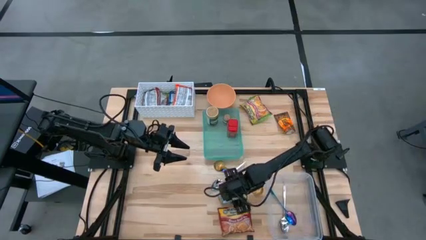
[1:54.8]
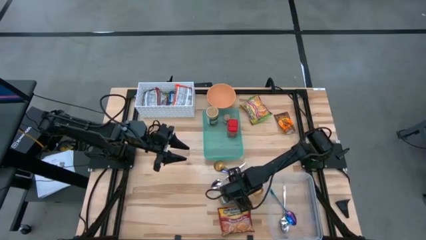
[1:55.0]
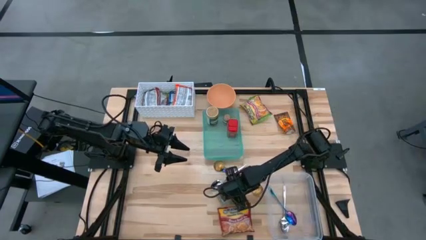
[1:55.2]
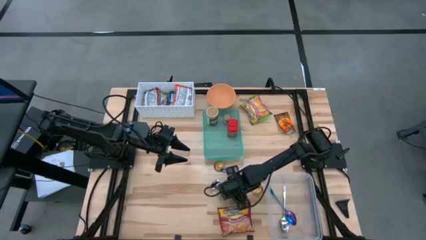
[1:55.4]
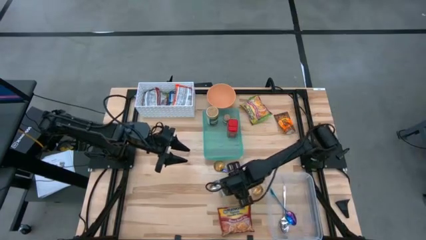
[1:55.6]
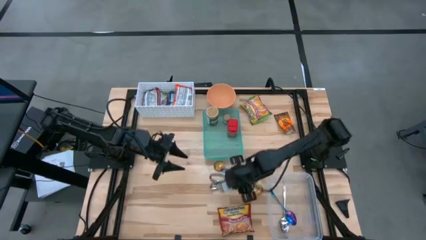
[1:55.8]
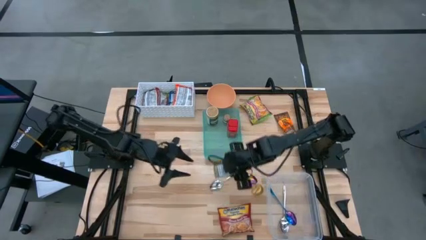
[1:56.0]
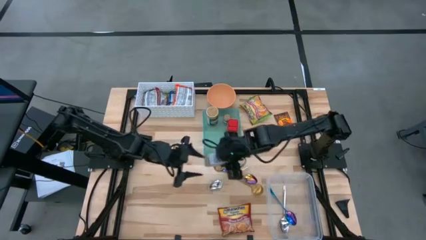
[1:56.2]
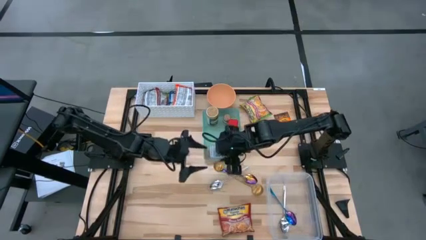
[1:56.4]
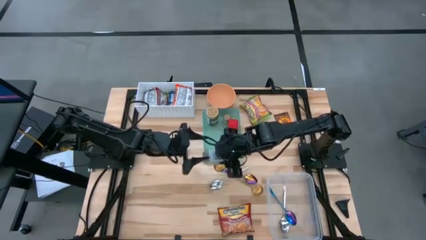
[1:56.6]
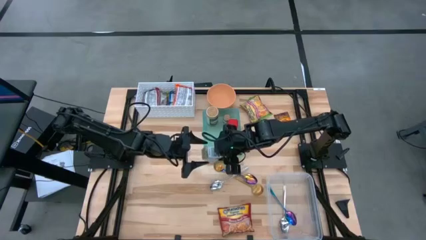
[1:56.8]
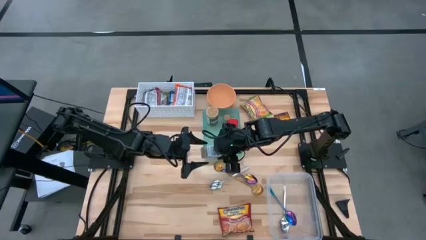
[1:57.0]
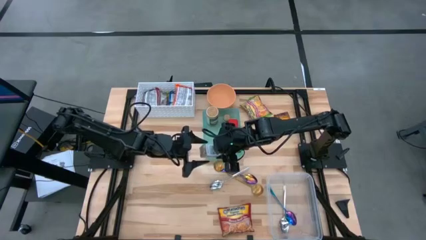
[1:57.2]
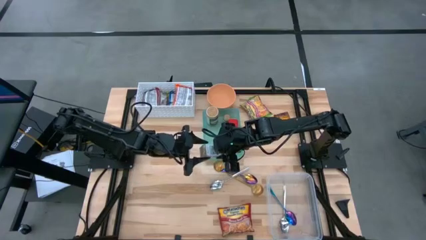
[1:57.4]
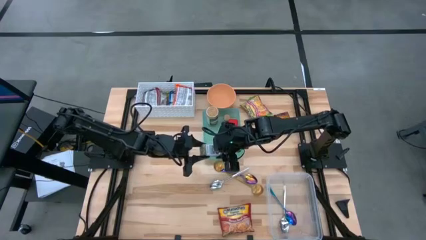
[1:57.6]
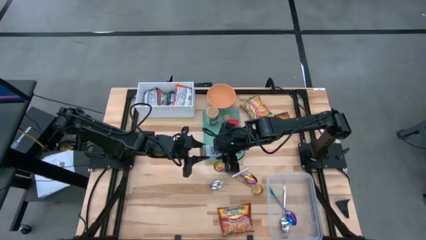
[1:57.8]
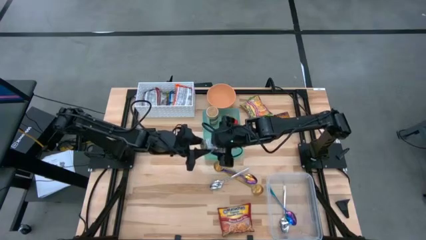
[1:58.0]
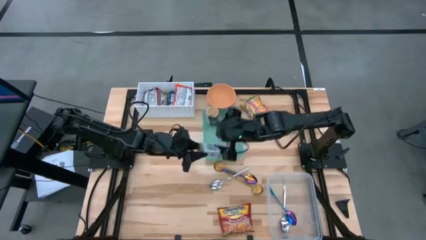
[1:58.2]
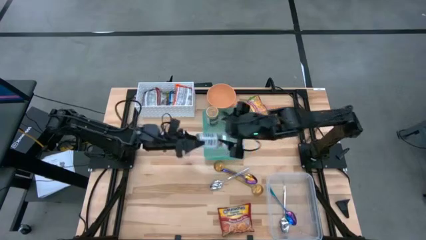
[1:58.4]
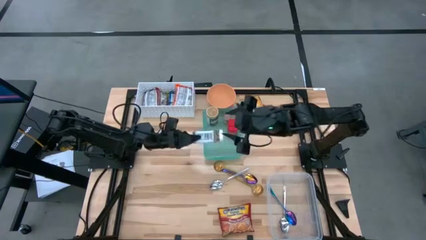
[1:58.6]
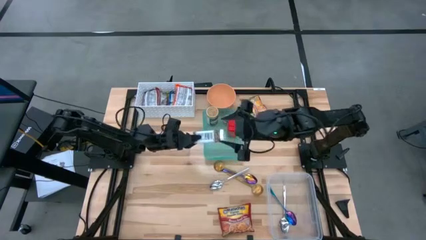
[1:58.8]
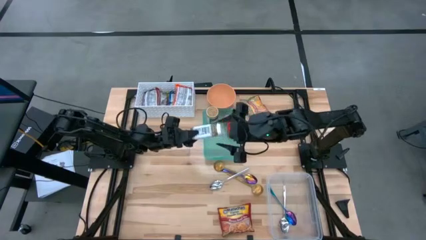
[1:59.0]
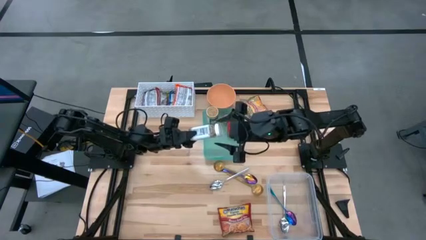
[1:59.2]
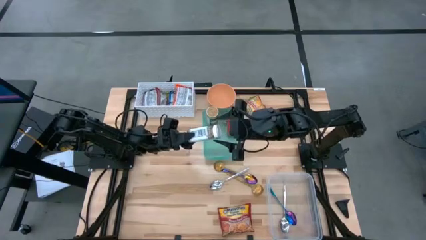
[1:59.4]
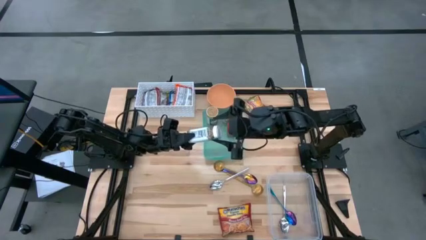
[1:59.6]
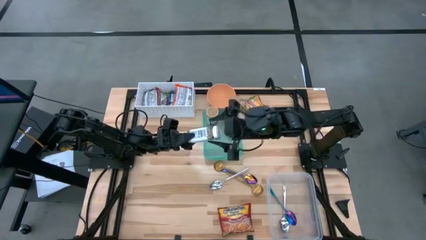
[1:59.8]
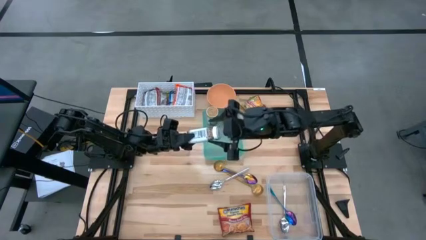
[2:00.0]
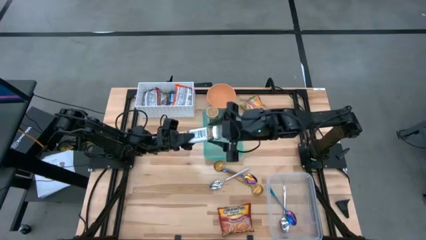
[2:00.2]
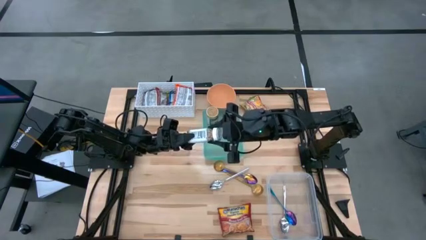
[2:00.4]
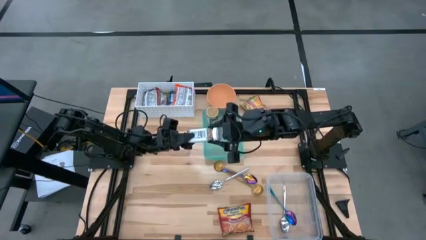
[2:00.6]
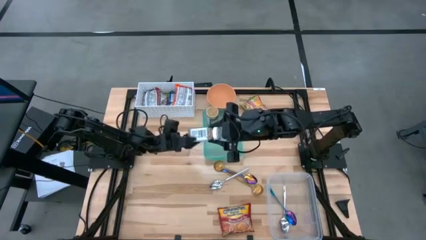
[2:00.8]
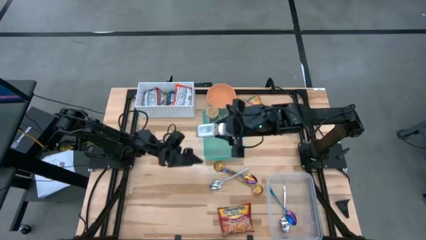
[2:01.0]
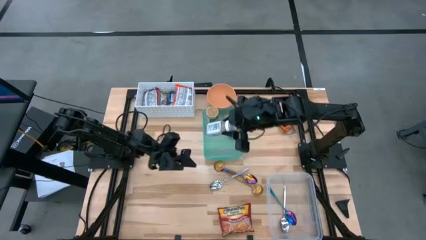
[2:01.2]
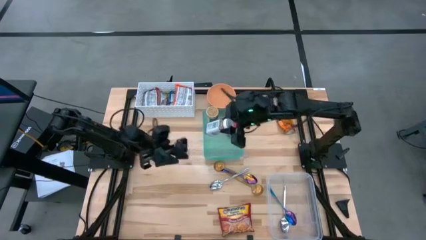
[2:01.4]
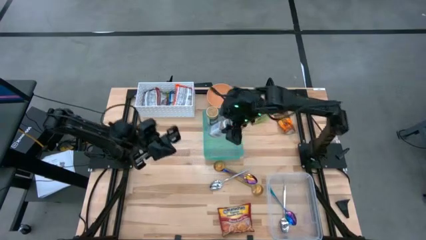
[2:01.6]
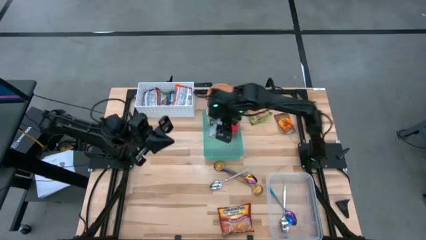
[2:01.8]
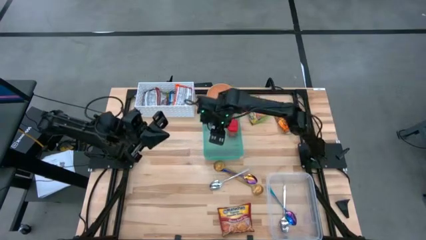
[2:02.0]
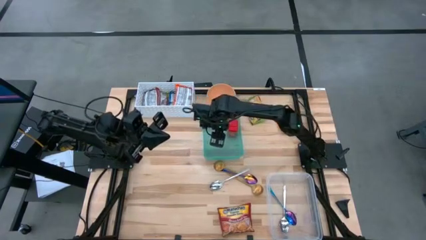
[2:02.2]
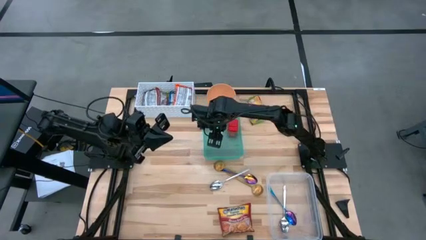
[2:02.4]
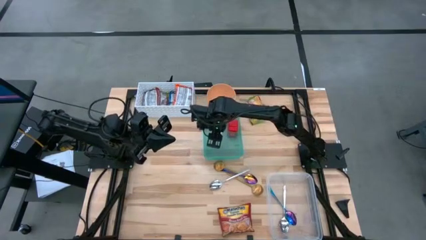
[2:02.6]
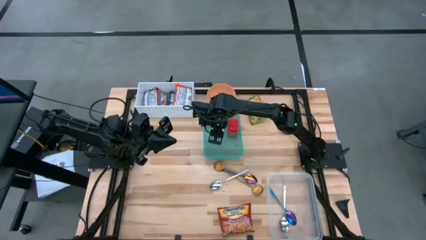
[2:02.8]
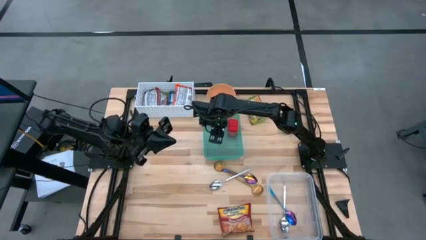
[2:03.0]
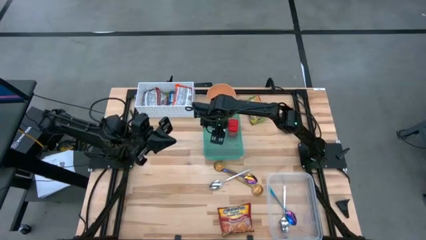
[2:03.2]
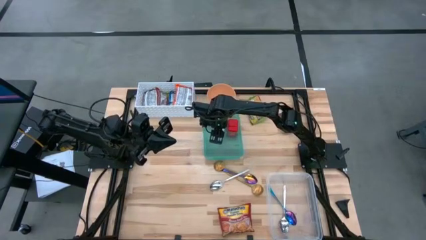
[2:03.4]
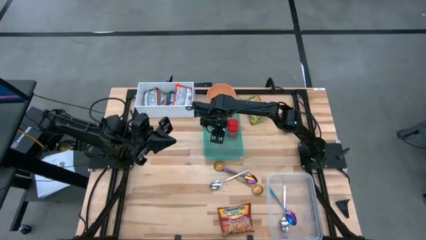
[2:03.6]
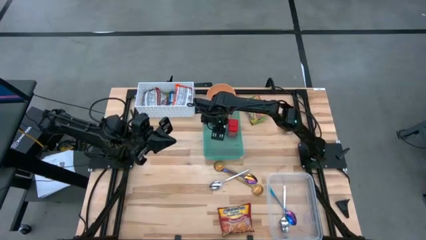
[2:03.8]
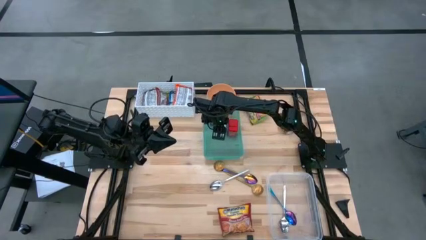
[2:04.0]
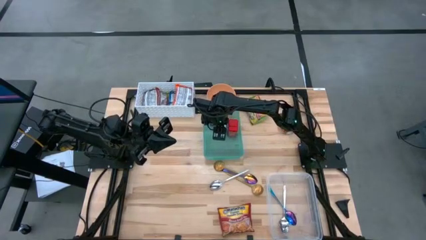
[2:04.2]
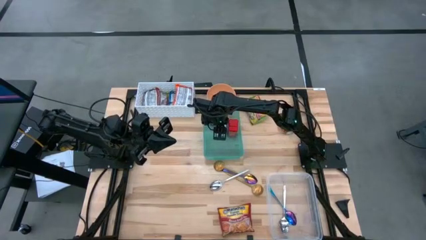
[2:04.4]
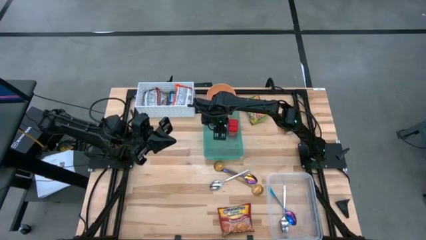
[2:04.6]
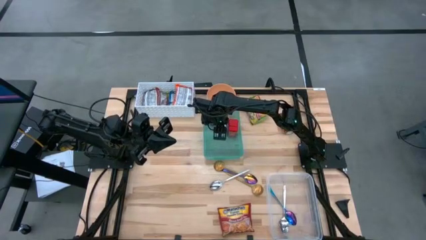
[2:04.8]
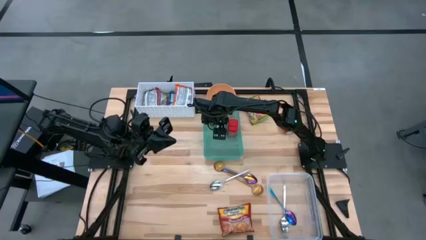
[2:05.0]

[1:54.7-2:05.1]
Task: Pick & Place Food Item
Put the white seasoning into the blue bin

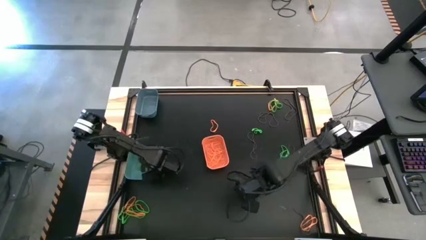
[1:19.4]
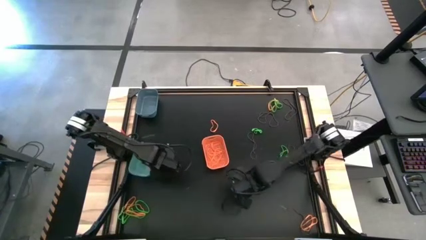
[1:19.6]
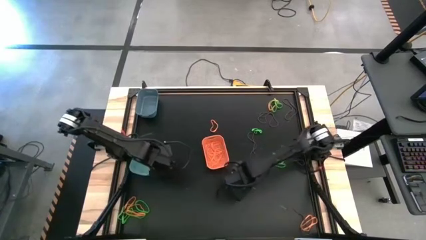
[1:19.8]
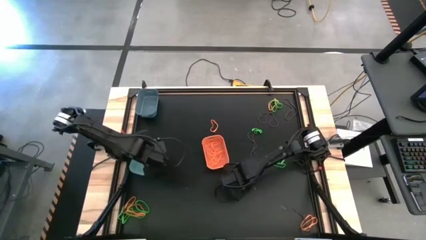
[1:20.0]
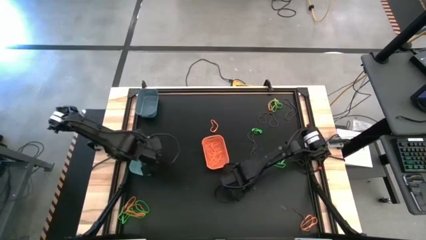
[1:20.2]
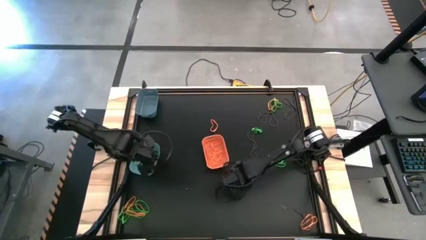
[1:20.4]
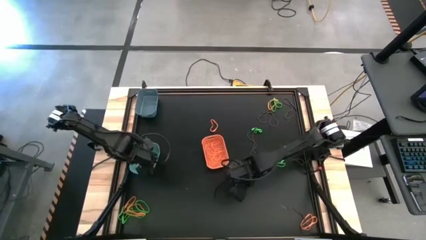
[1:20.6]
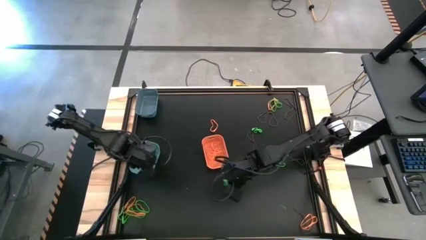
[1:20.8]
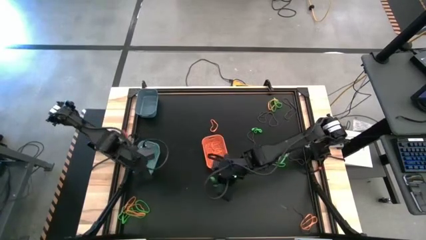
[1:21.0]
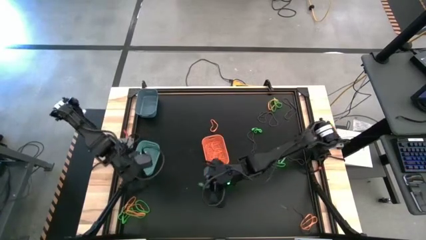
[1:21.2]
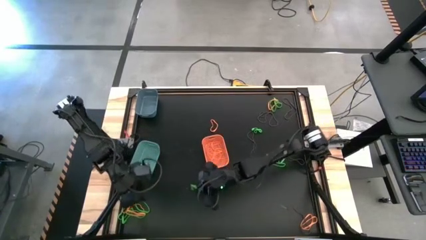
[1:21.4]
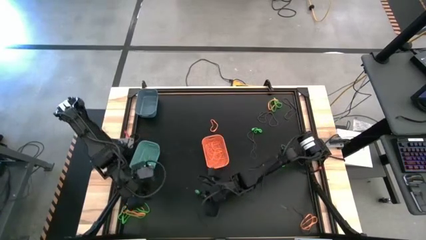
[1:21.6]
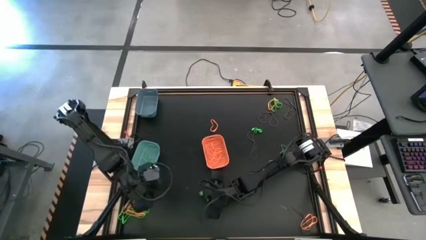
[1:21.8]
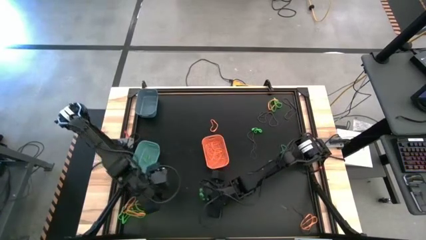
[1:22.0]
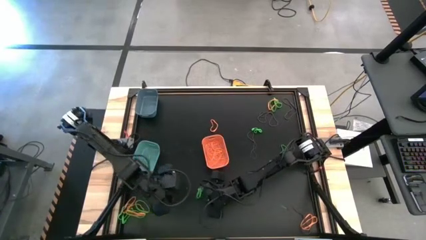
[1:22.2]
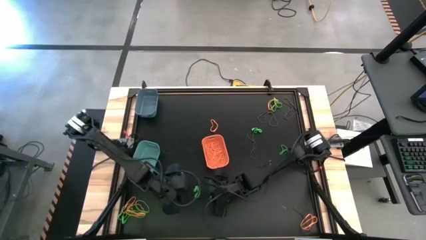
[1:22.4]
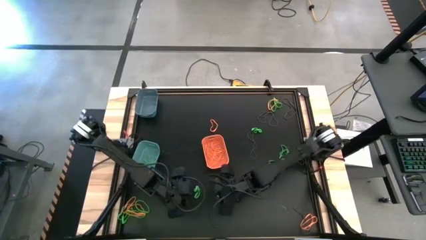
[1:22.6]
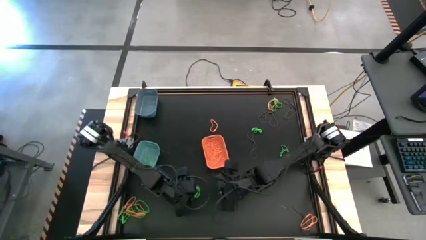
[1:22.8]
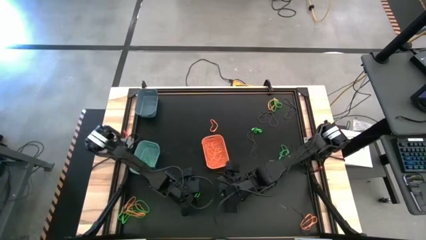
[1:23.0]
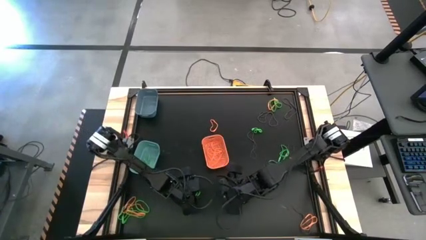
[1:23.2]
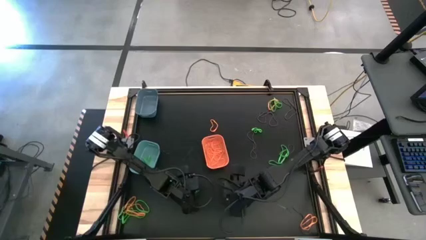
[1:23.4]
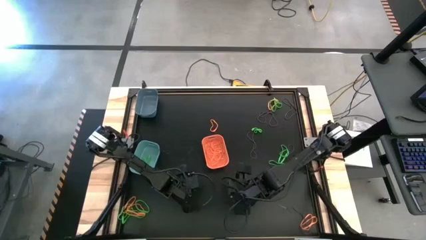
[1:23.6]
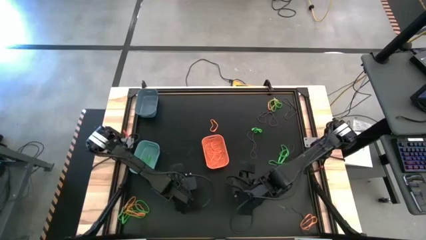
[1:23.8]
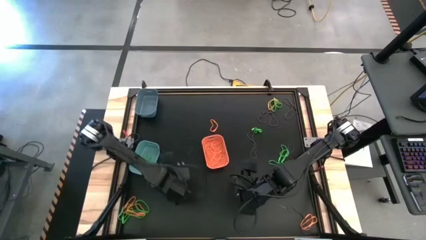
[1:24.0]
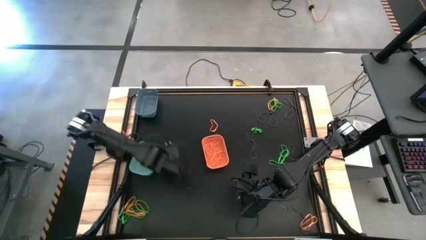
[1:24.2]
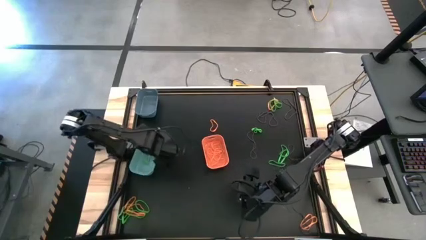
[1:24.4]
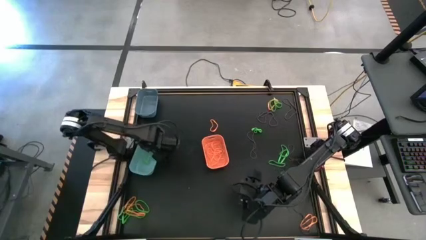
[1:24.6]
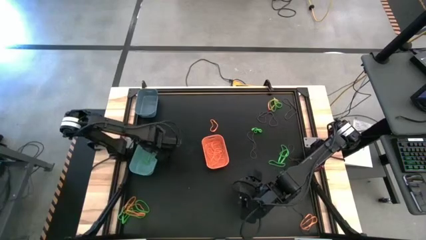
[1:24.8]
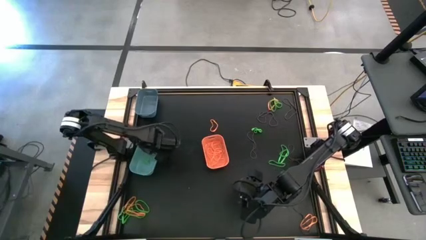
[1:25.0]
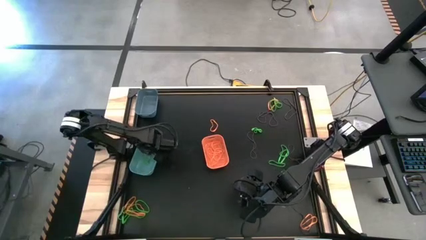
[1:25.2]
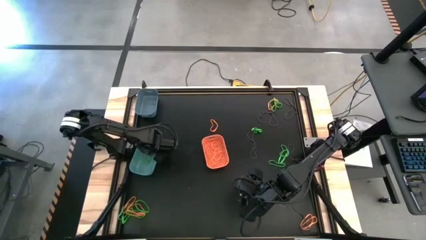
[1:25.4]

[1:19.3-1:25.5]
Task: Sort rubber bands into baskets
Put the green rubber band into the light sea green bin
